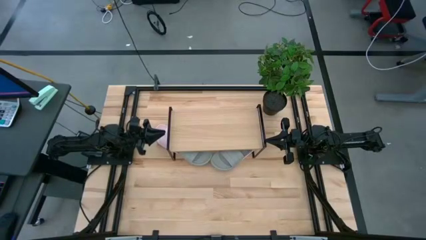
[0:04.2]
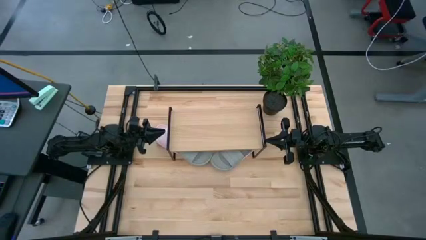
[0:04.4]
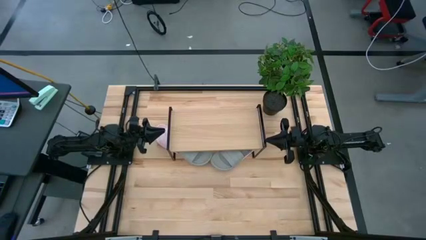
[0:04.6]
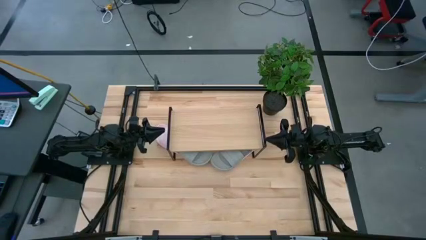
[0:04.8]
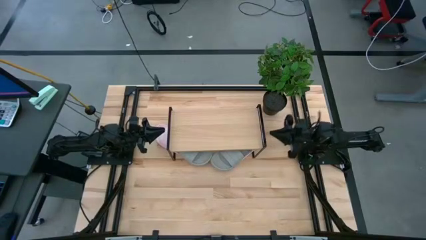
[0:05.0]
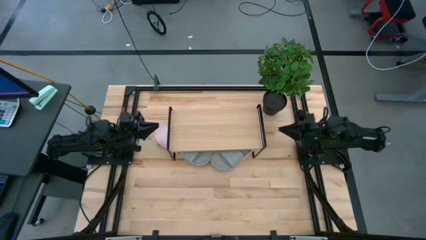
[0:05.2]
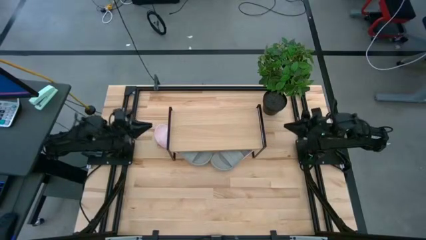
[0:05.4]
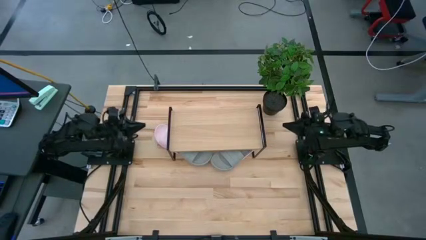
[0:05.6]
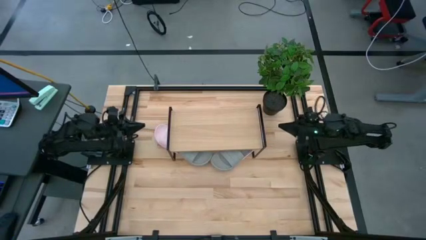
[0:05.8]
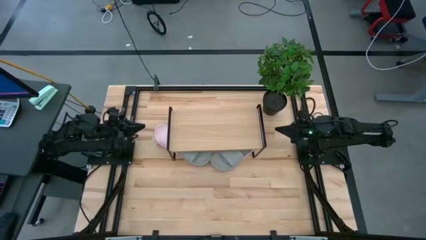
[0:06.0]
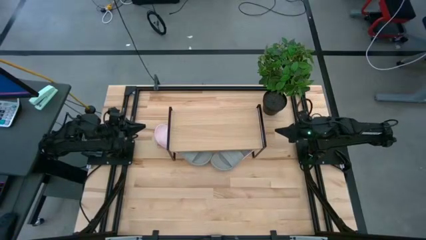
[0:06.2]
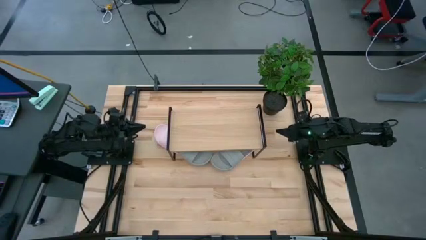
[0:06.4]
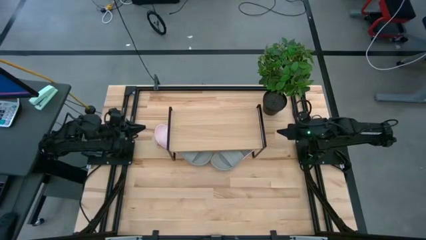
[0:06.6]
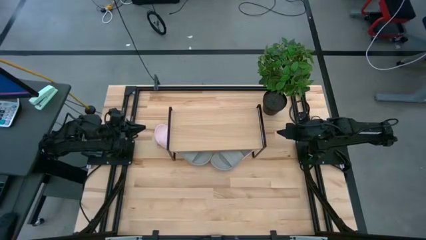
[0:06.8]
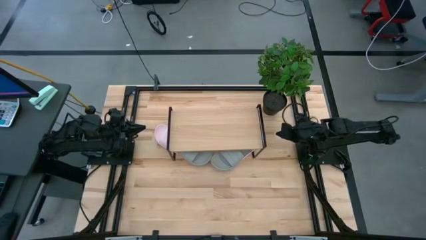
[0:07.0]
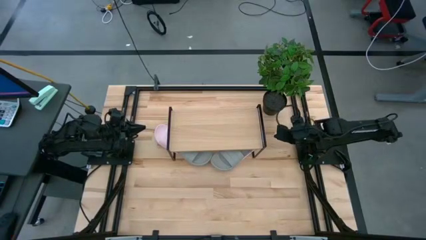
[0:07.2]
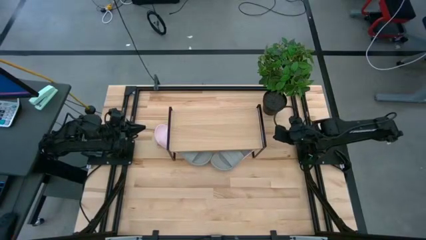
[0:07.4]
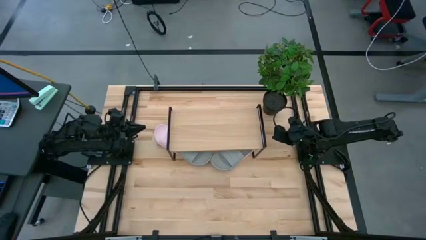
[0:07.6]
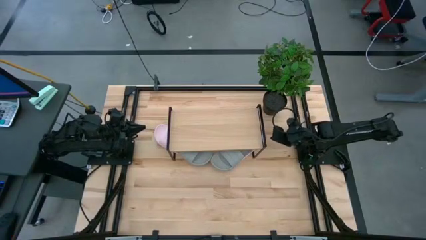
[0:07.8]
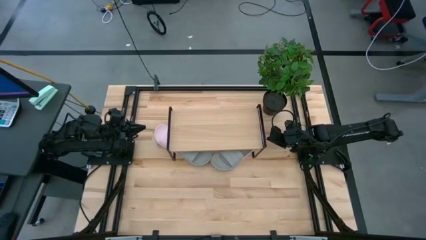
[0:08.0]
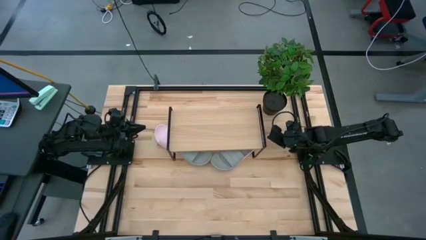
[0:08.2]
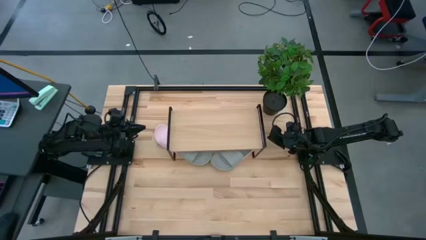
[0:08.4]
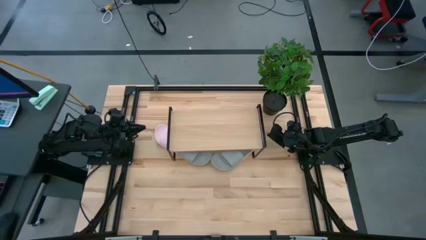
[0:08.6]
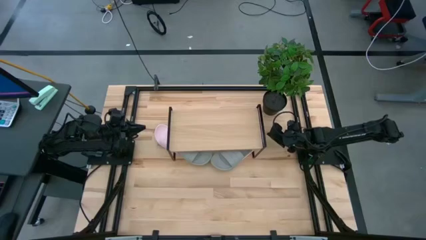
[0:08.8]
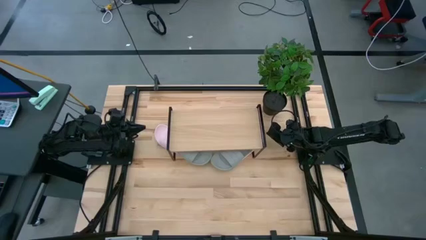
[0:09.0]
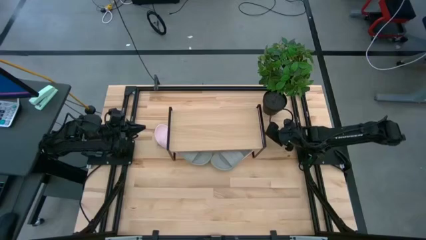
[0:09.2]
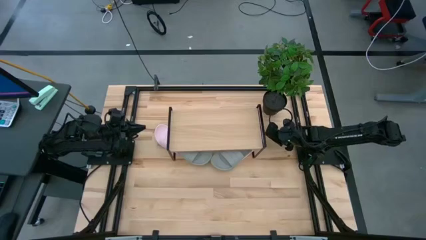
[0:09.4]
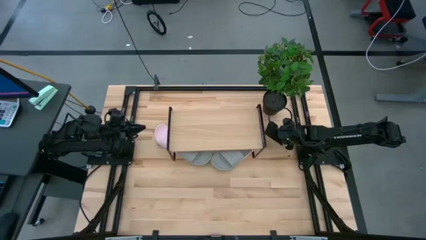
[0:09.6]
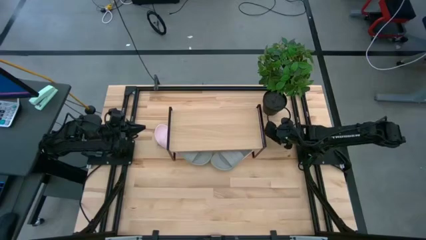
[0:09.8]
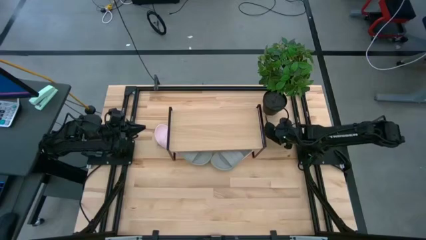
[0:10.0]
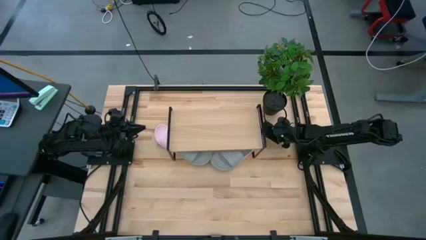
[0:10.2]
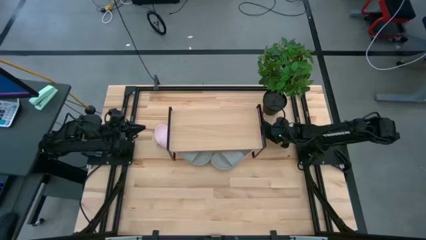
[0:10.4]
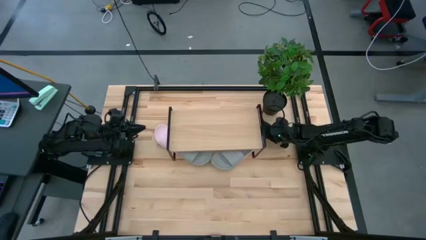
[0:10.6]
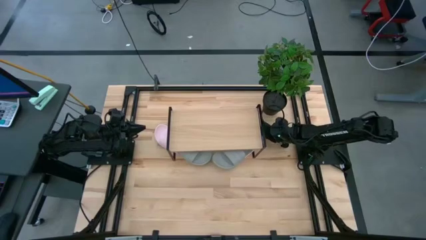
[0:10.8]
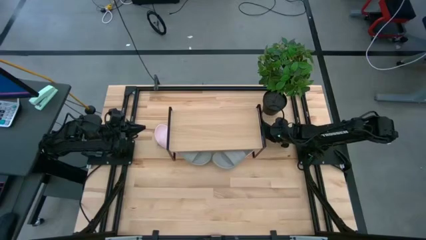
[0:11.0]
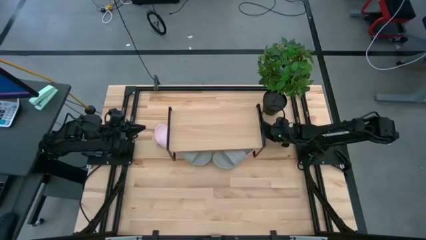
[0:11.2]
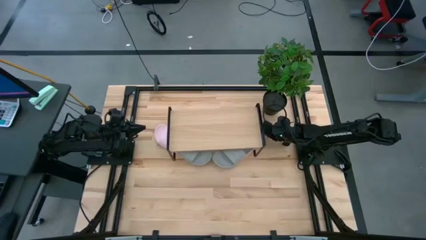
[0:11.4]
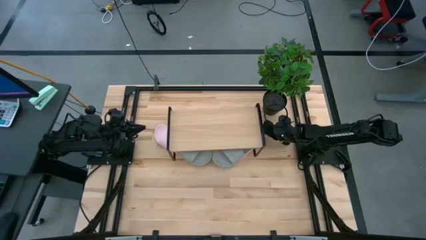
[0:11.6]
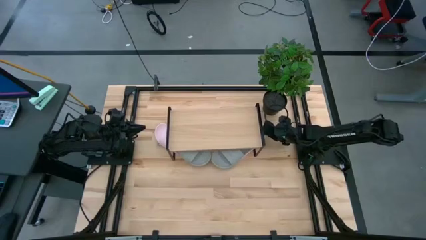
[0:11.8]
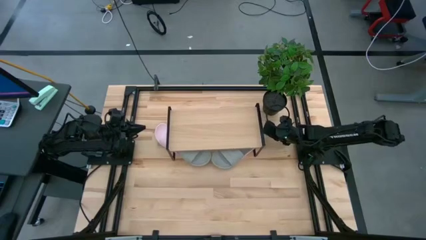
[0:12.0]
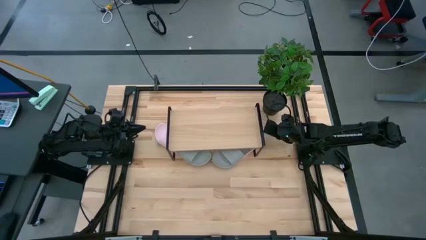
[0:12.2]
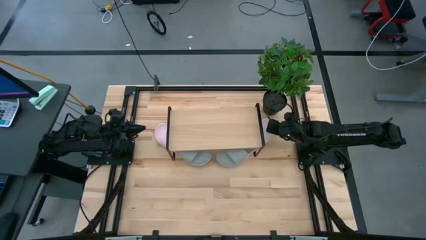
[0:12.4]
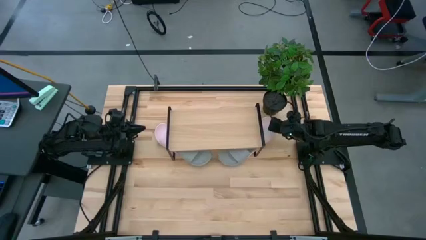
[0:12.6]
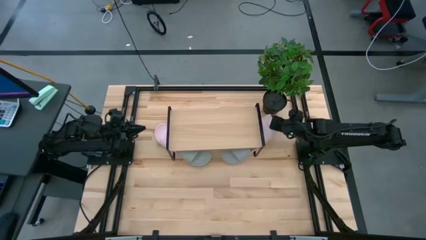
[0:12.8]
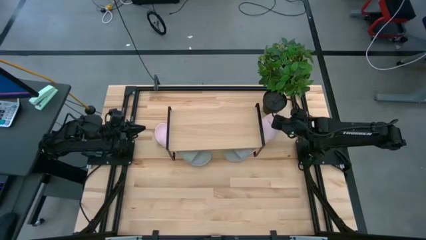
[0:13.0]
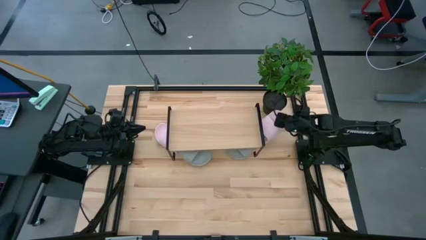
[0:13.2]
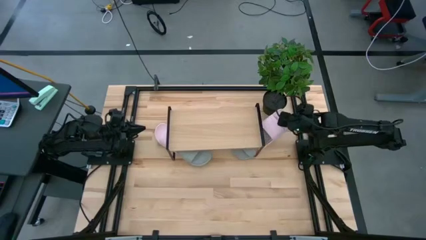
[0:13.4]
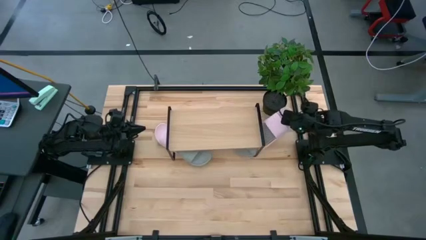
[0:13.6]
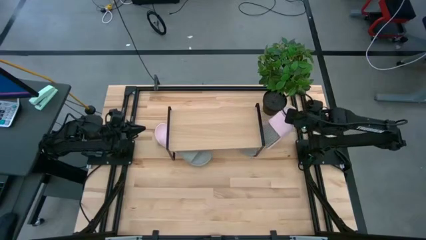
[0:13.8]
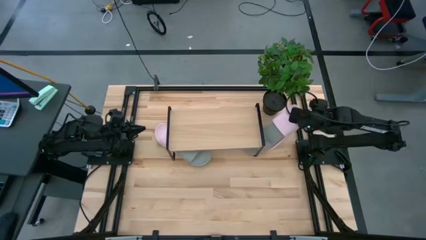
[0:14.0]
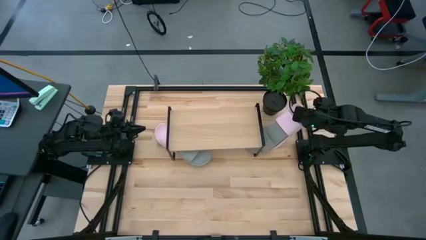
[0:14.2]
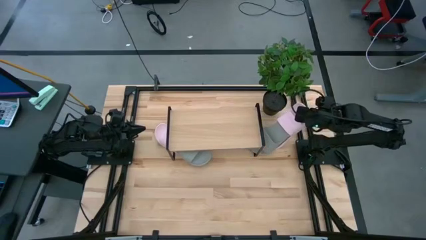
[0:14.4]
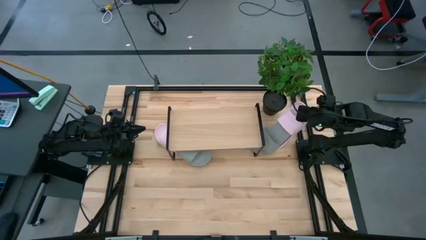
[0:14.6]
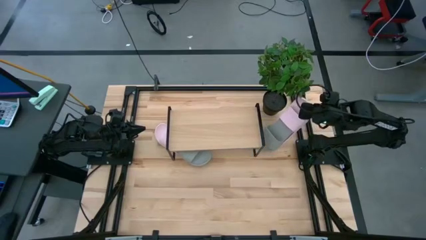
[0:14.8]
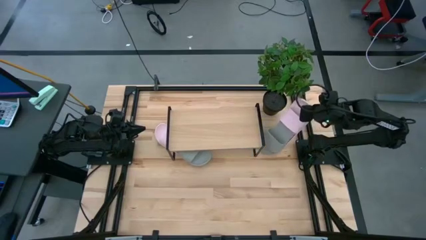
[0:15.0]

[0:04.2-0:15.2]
Task: Pick and place slides into the shelf
Put the right pink slide on the shelf

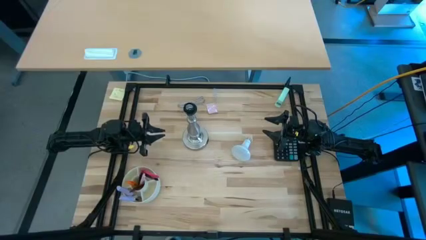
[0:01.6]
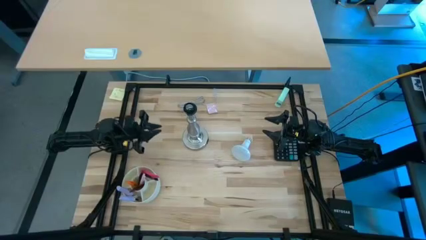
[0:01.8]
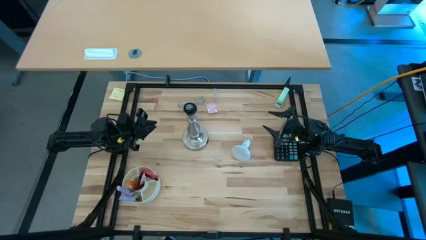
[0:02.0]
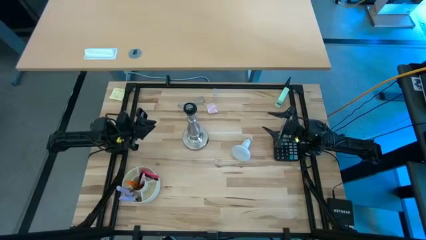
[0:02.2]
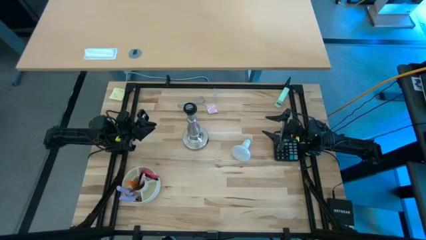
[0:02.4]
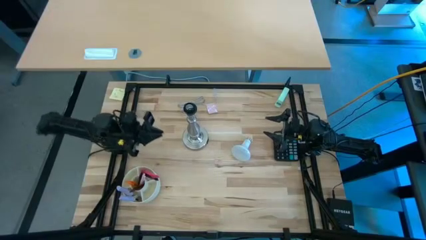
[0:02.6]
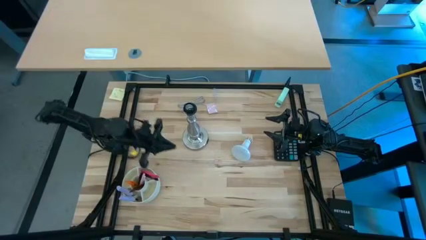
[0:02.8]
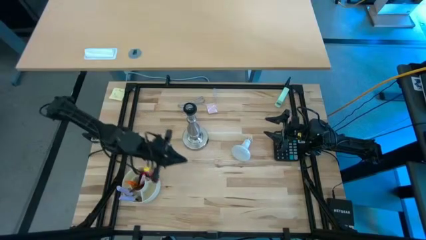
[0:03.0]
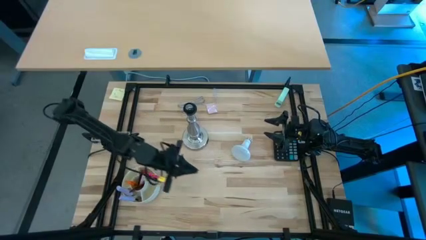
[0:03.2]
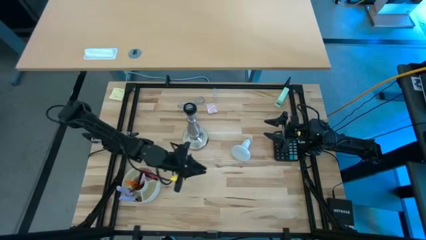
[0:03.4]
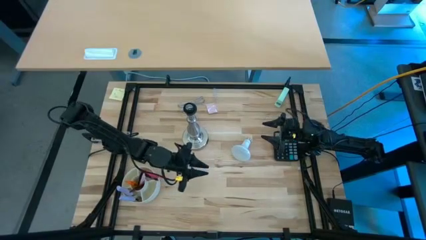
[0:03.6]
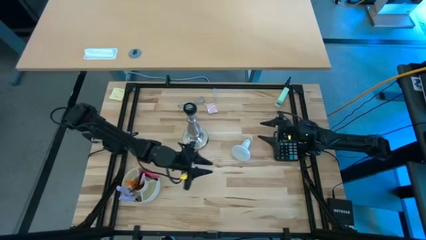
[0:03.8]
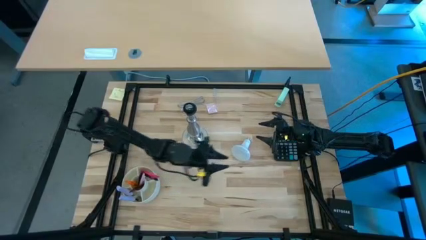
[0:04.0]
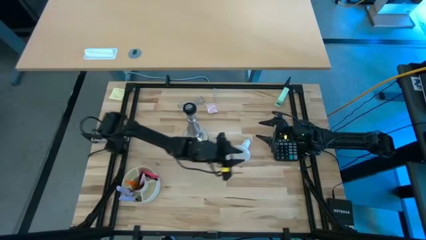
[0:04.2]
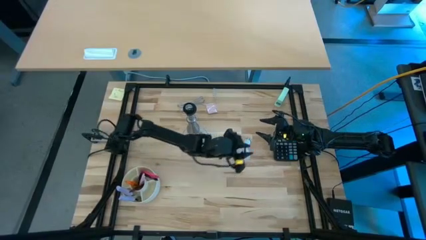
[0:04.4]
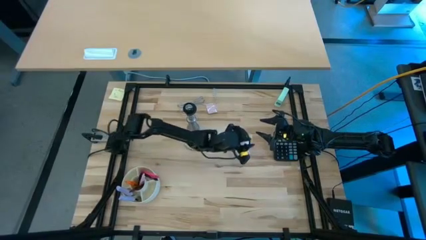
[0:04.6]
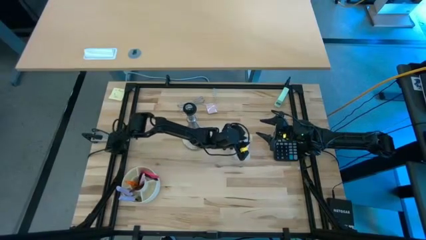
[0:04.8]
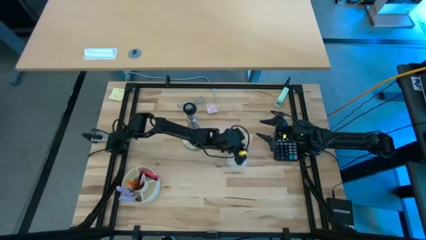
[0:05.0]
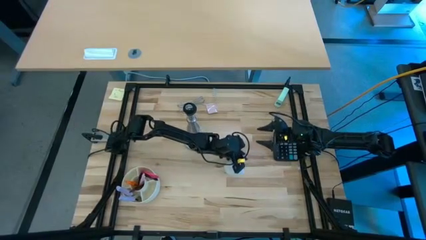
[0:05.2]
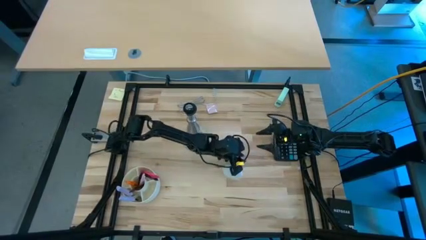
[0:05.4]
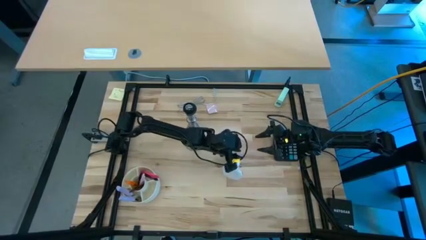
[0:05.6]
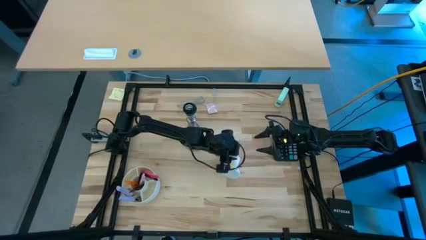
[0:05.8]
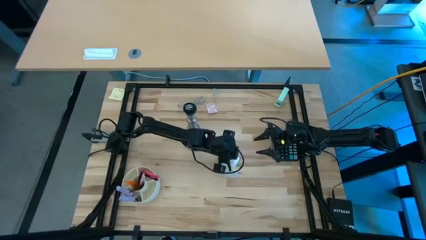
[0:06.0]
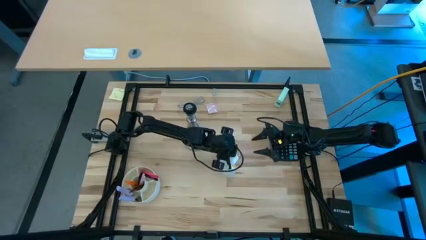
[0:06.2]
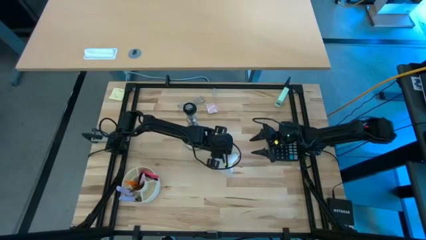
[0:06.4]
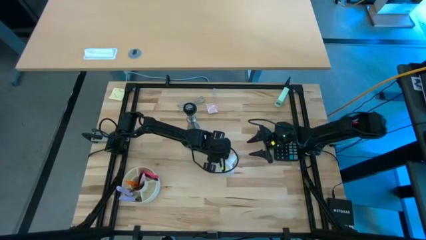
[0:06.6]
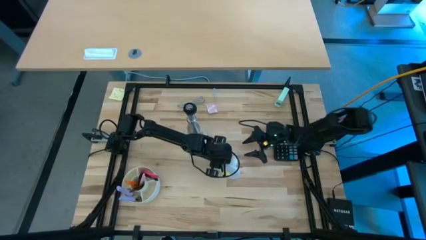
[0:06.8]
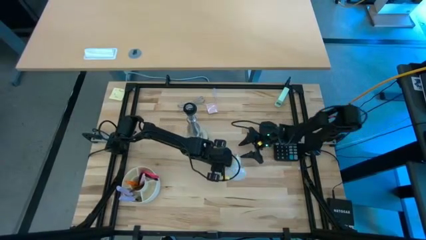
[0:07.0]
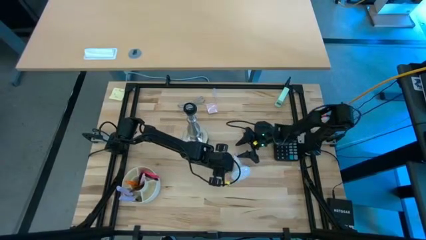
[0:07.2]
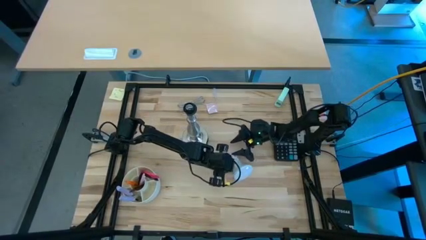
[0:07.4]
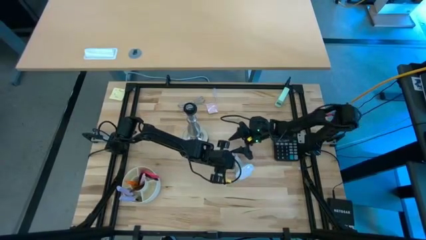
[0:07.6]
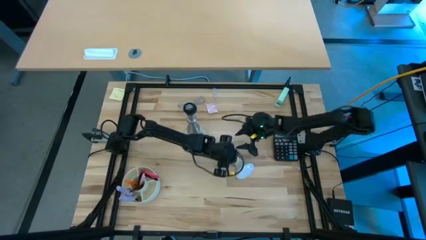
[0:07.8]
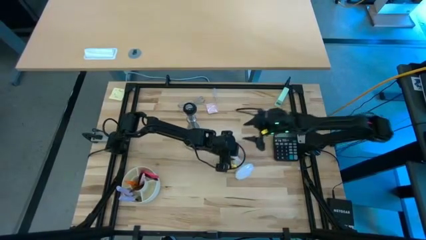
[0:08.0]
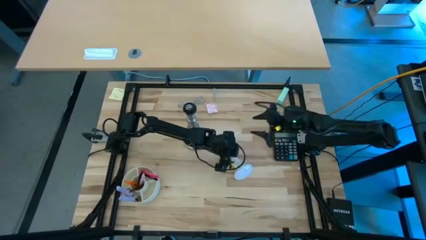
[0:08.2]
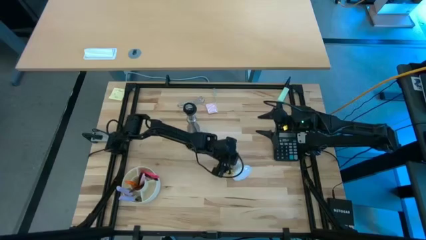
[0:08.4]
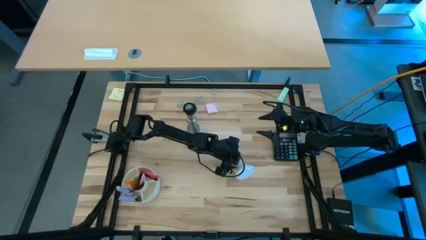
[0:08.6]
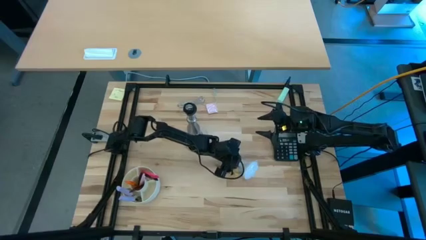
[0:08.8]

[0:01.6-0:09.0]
Task: Screw lightbulb
Insert the white lightbulb on the silver lamp
